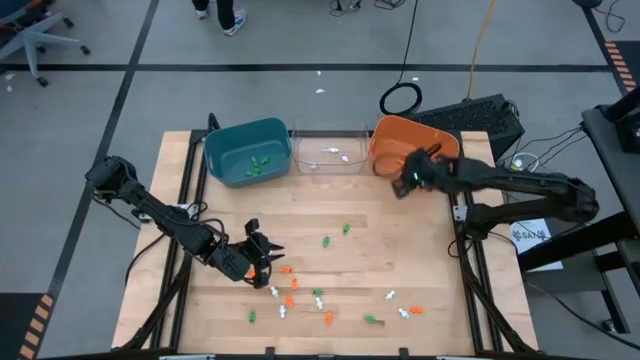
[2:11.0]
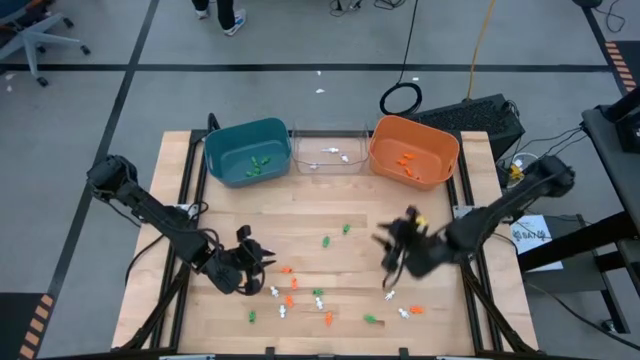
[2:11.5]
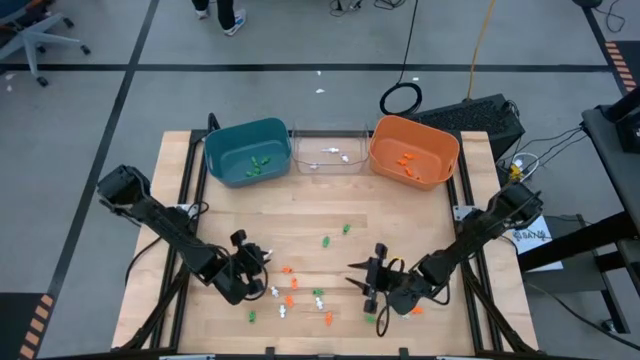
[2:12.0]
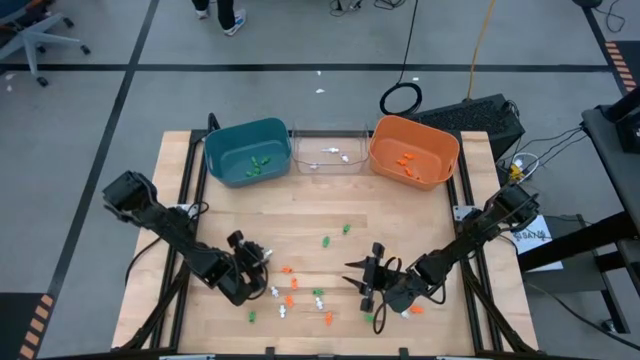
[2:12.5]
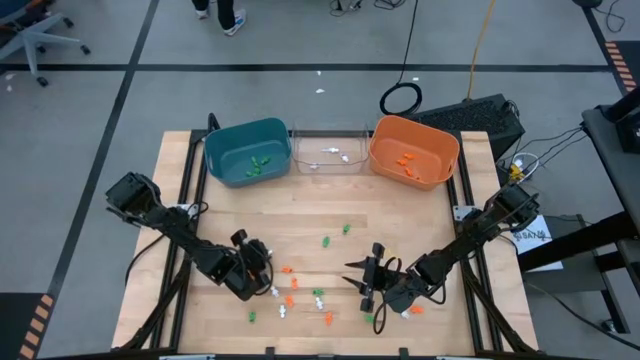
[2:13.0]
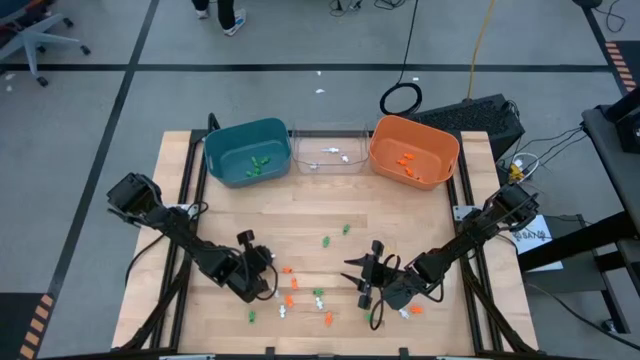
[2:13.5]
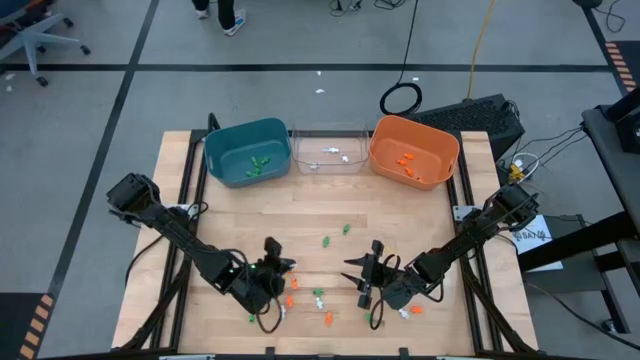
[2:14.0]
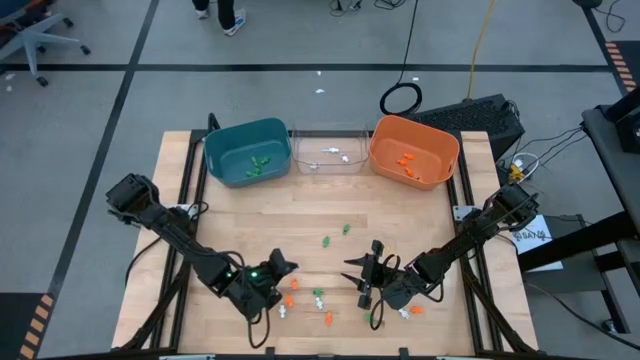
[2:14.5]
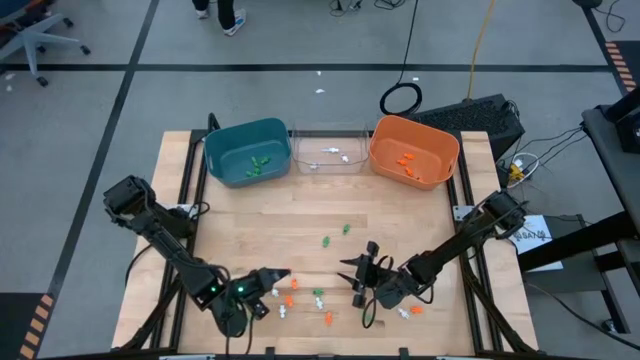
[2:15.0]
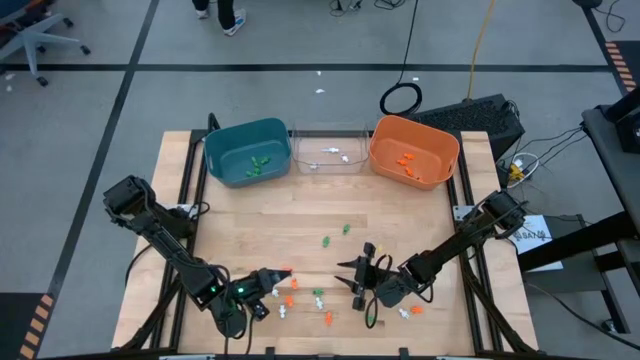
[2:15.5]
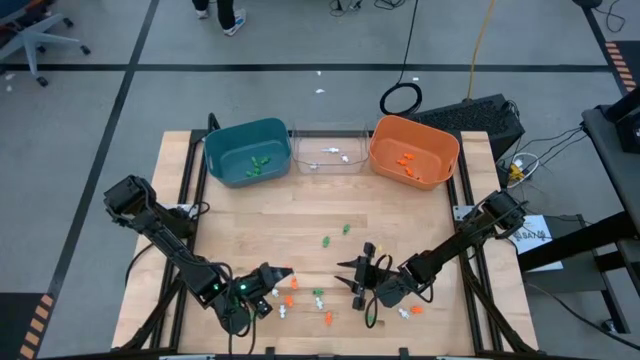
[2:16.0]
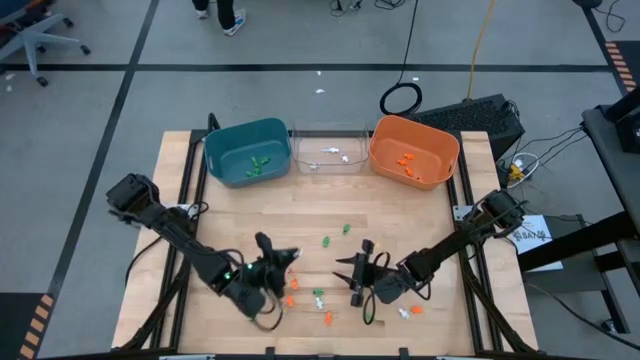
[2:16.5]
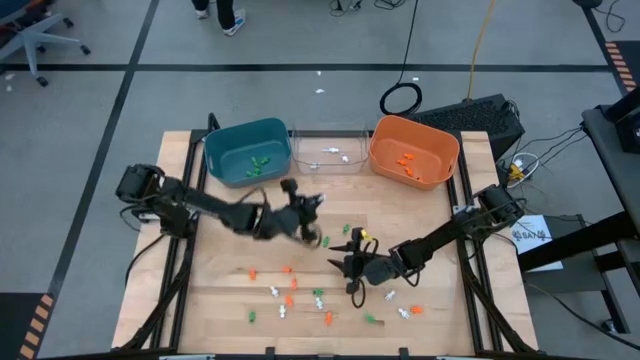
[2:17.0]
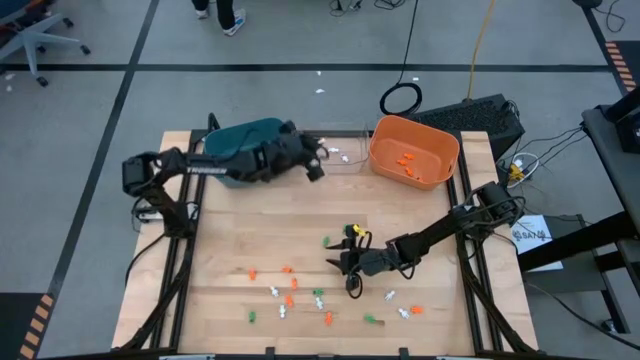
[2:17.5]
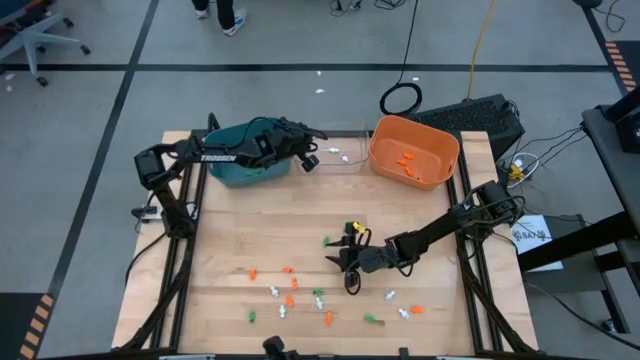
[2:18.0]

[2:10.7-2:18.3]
Task: Sort Halloween decoration
Put the white skeleton toy into the transparent bin

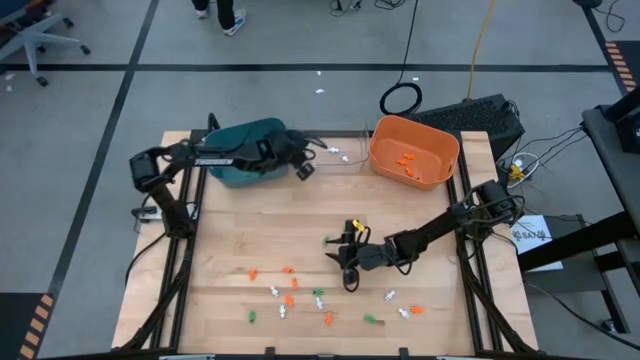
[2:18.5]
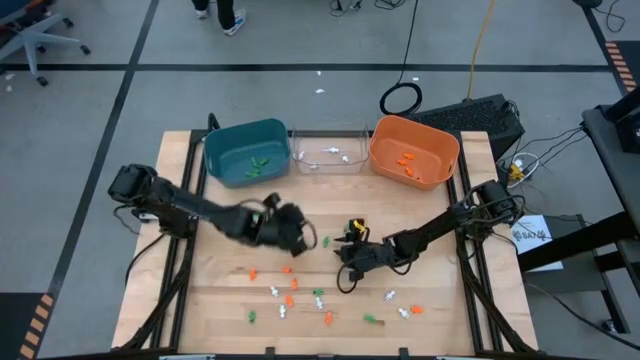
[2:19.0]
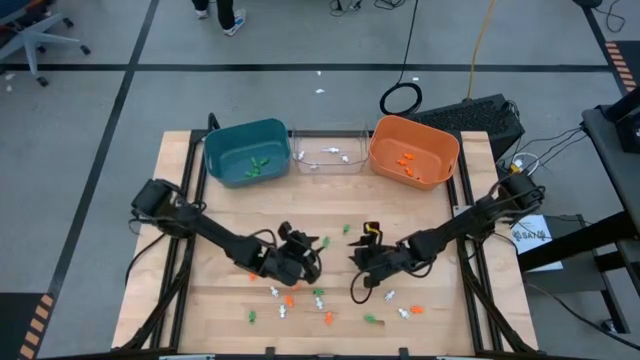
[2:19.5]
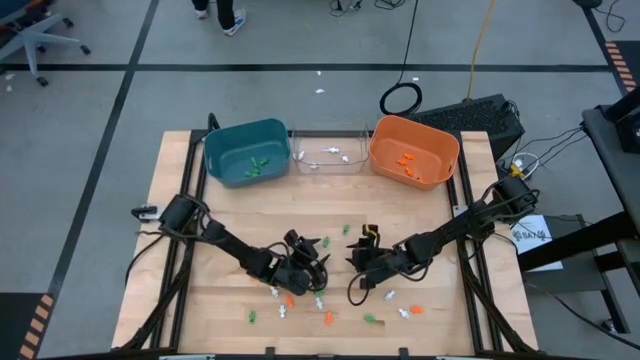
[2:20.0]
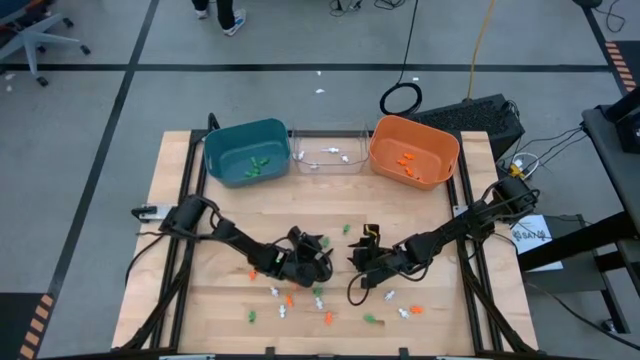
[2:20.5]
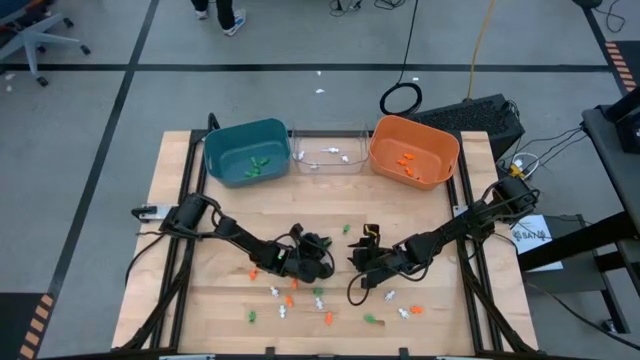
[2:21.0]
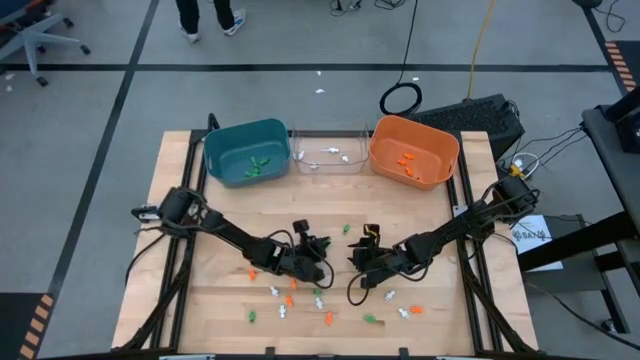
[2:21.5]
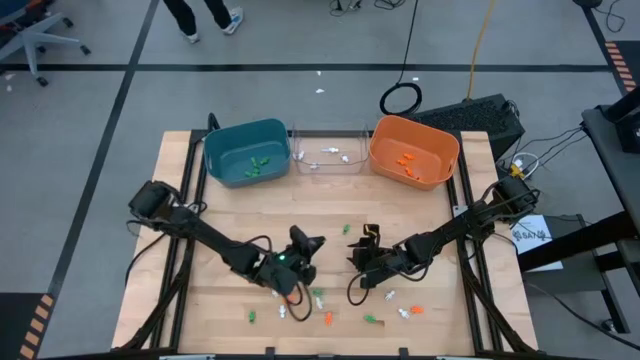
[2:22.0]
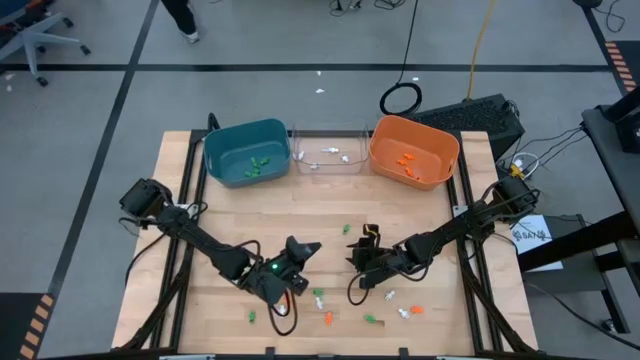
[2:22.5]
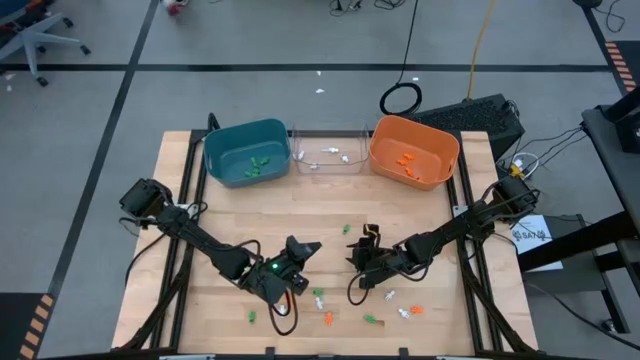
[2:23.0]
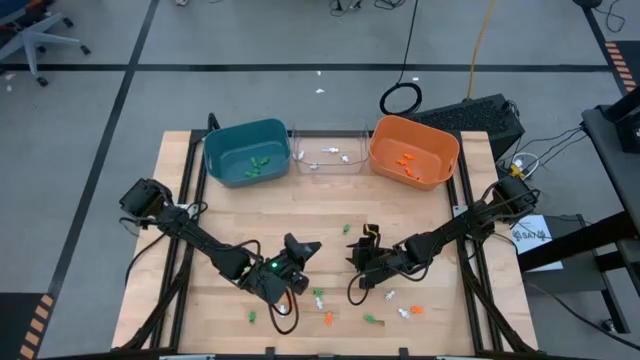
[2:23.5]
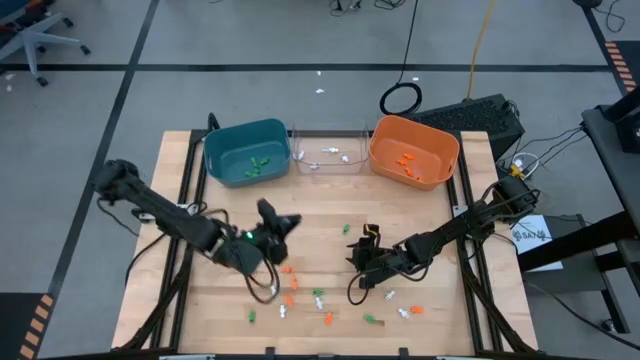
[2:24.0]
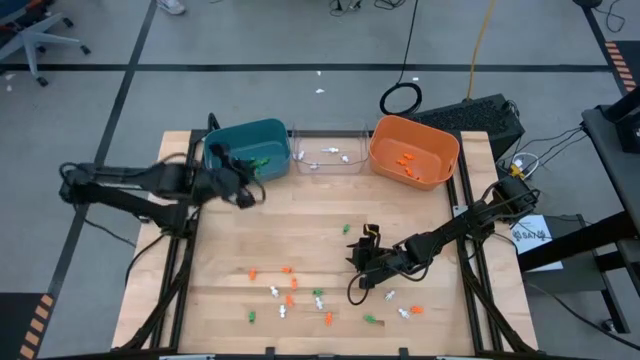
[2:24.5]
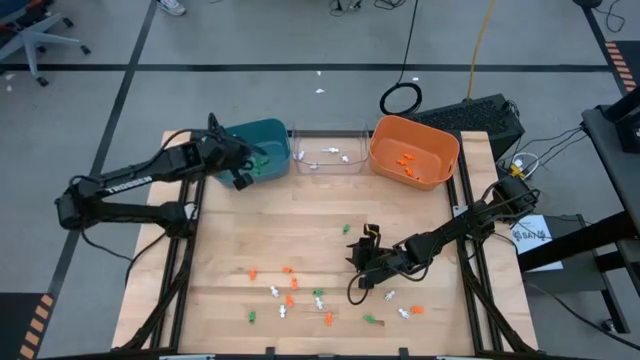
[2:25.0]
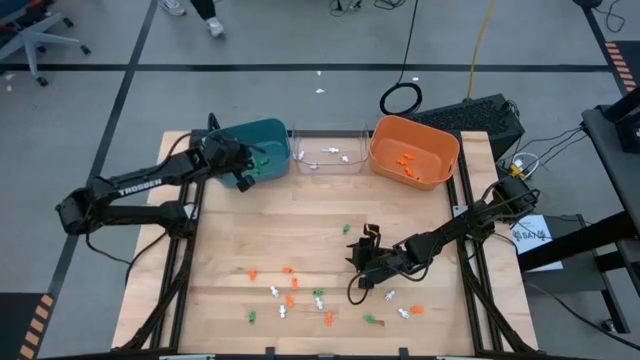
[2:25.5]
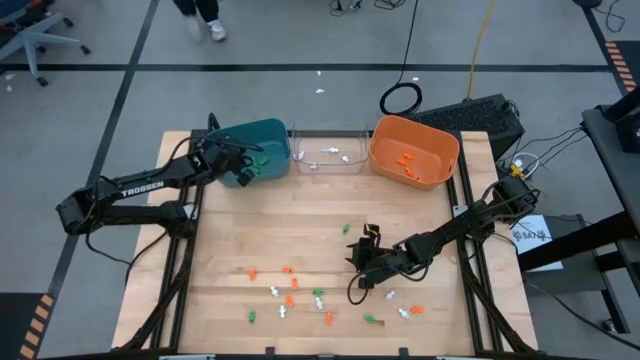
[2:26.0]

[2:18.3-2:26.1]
Put the green skeleton toy into the blue bin

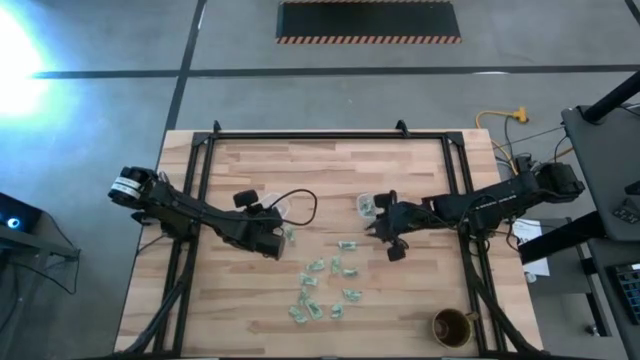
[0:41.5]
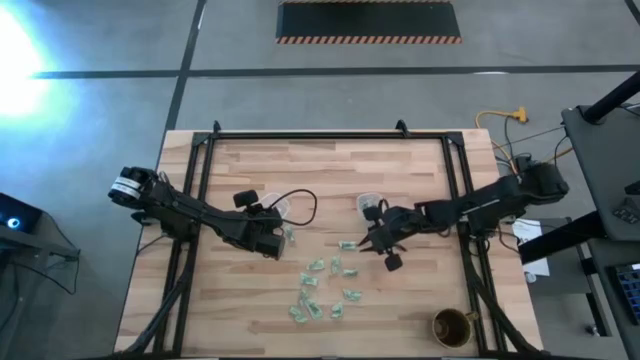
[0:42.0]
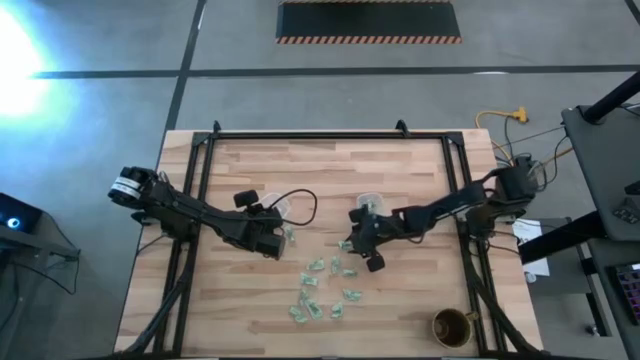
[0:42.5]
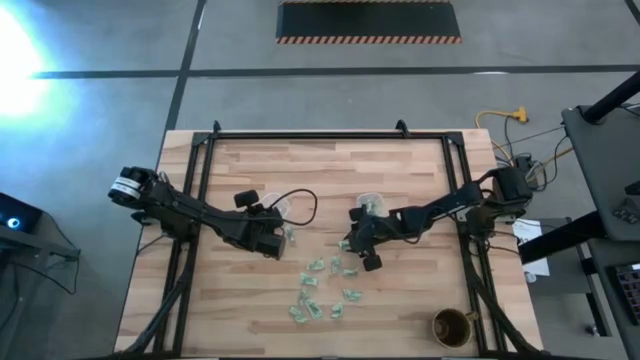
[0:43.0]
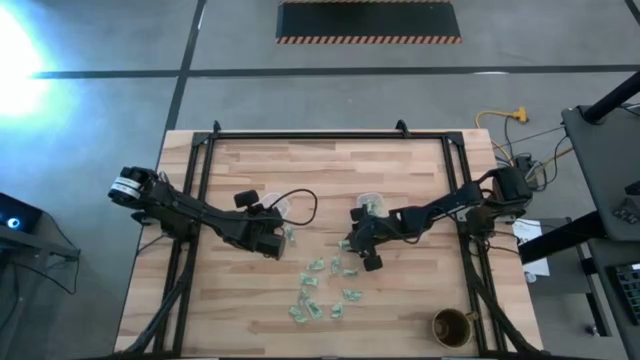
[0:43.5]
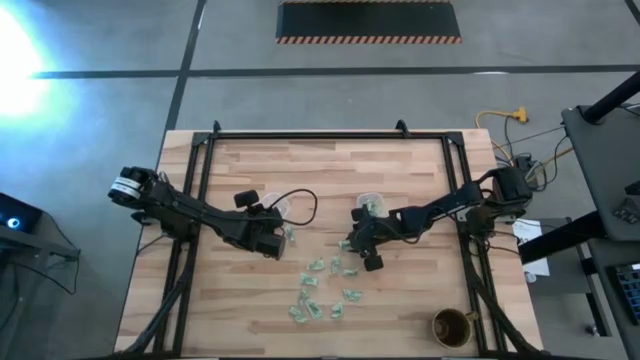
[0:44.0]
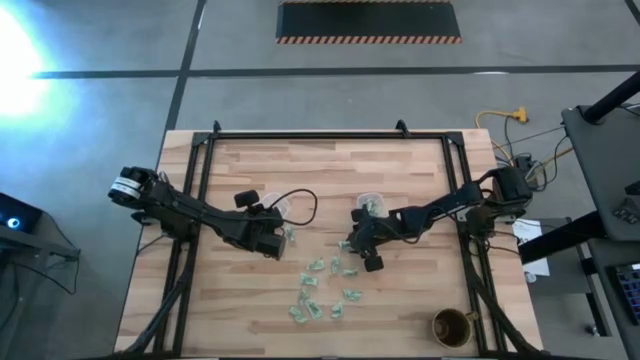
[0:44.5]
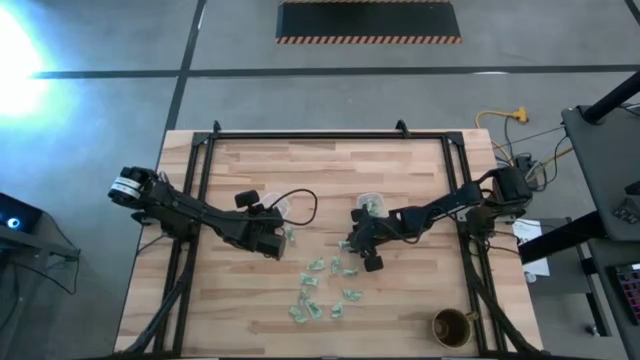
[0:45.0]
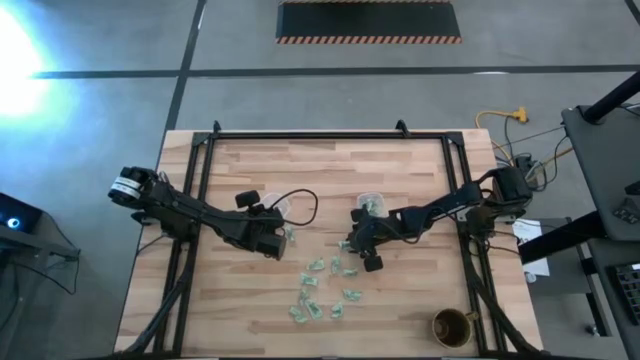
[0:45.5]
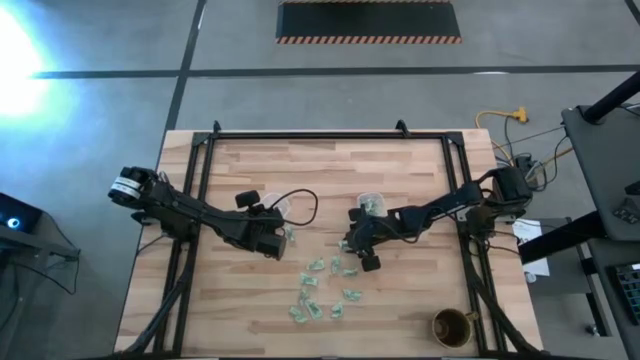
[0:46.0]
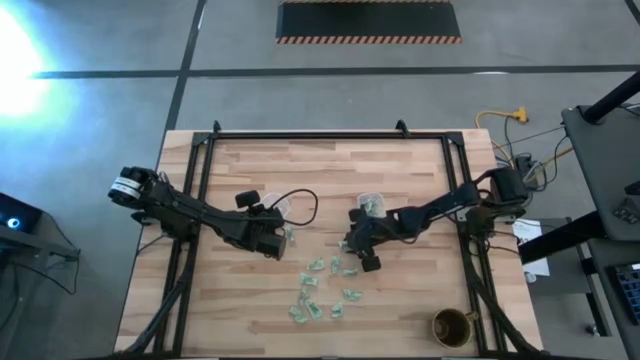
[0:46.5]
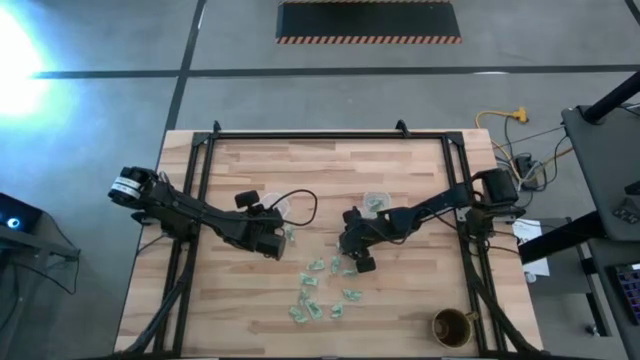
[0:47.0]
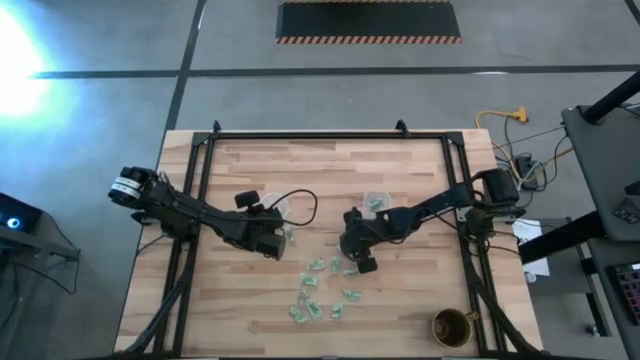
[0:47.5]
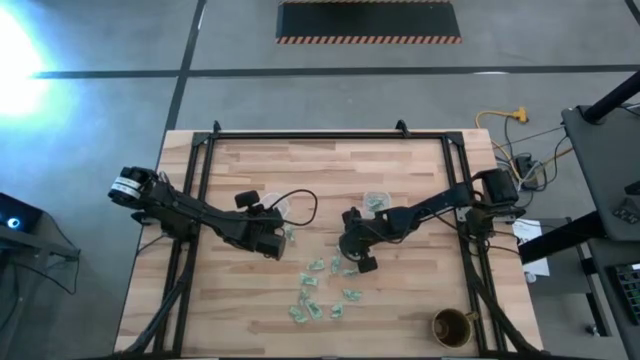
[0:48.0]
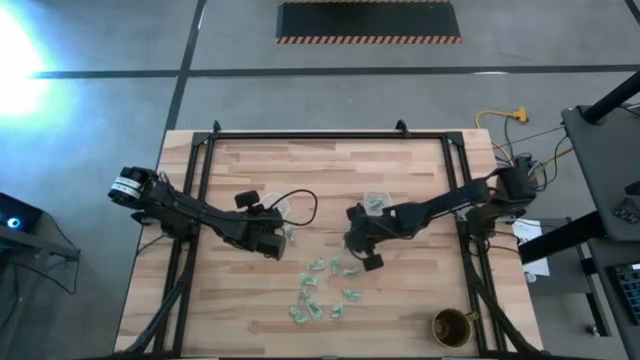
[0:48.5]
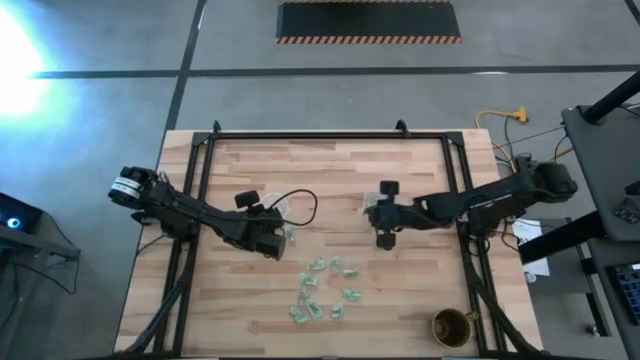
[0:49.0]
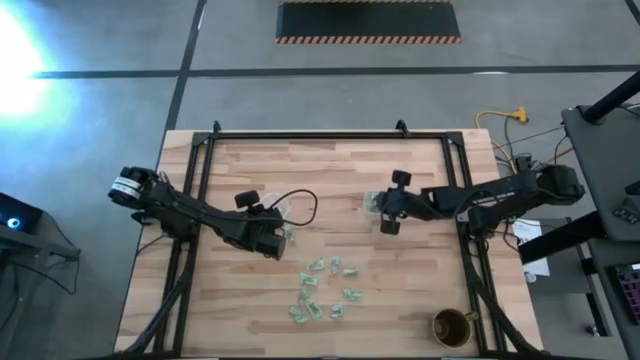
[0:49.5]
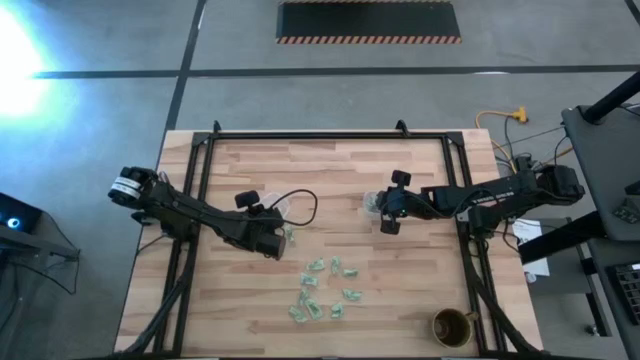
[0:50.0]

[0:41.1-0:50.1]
Task: Pick and place Stevia / Truvia into bins
Put the light green stevia packet into the right transparent container
